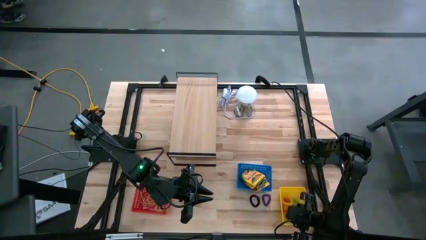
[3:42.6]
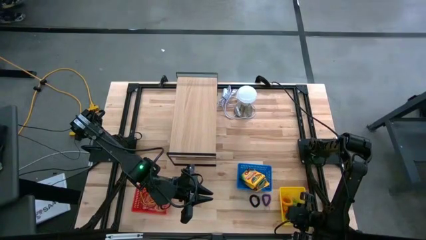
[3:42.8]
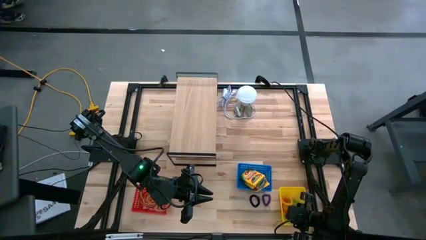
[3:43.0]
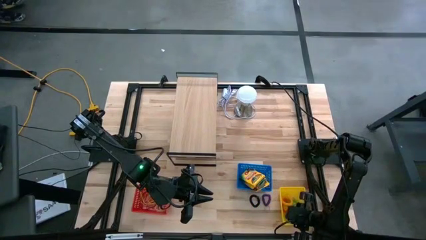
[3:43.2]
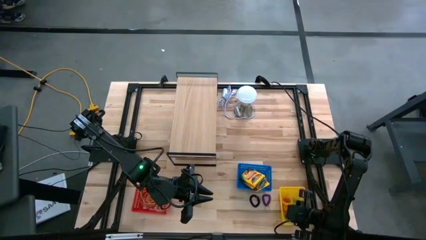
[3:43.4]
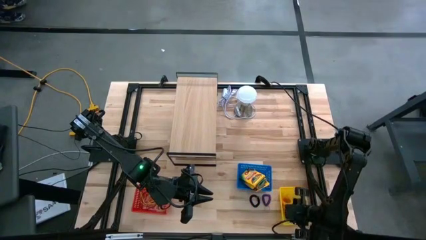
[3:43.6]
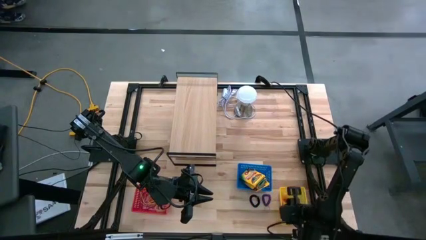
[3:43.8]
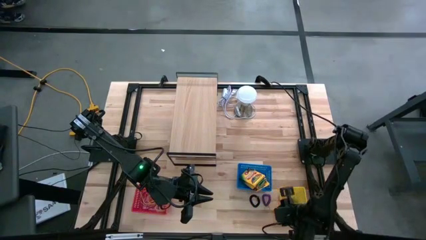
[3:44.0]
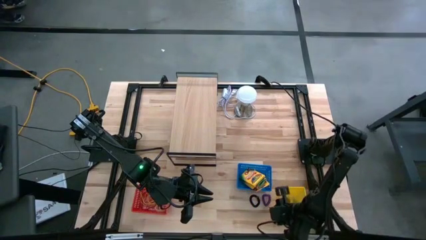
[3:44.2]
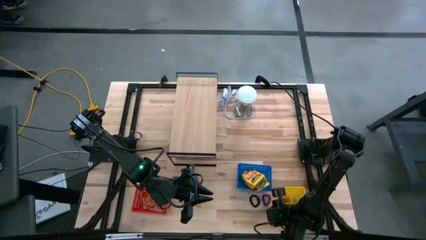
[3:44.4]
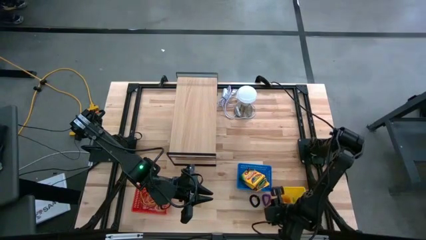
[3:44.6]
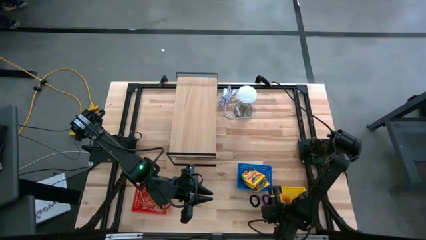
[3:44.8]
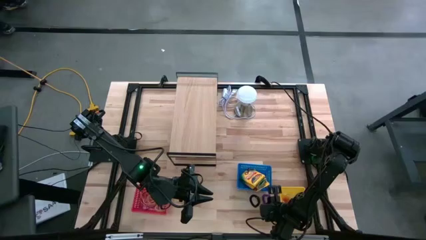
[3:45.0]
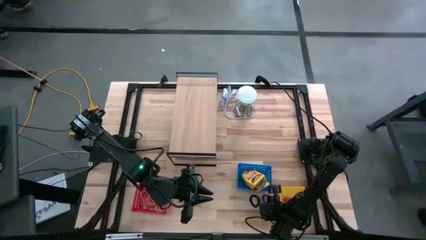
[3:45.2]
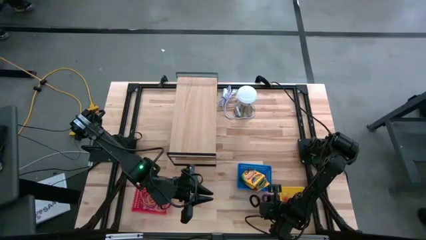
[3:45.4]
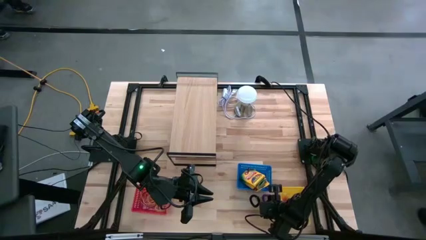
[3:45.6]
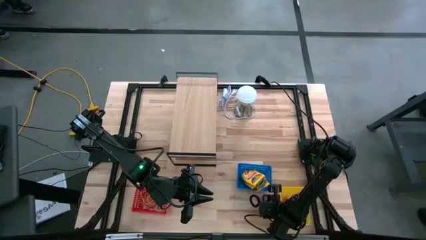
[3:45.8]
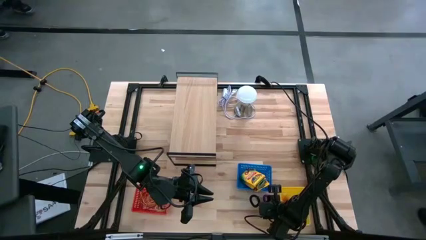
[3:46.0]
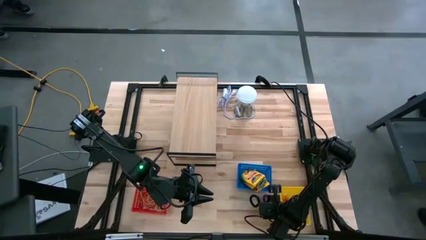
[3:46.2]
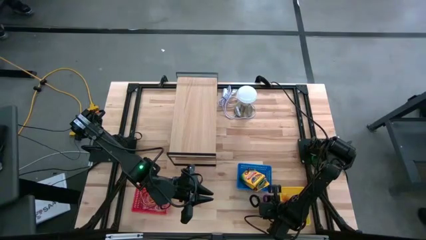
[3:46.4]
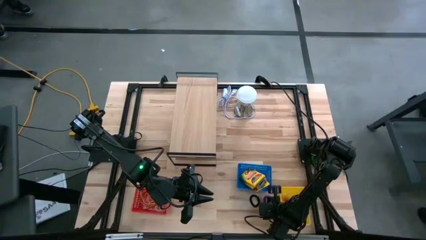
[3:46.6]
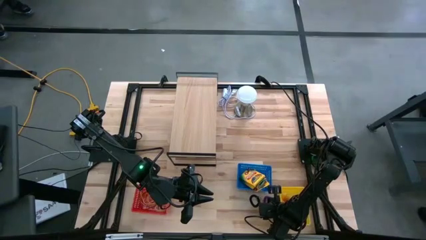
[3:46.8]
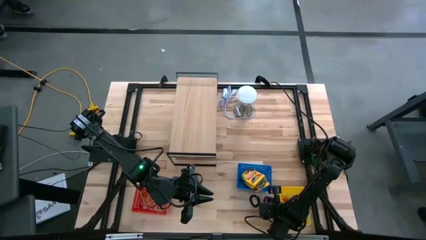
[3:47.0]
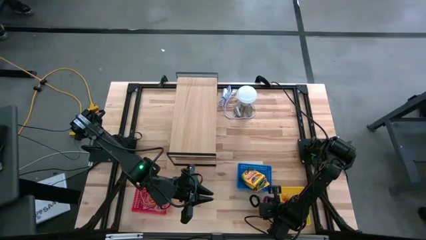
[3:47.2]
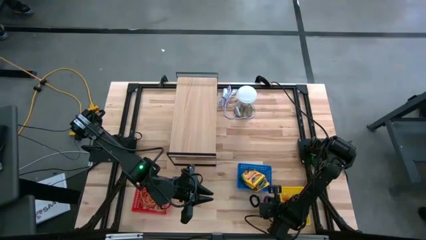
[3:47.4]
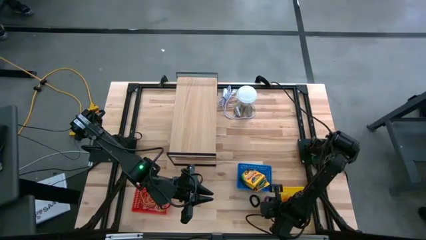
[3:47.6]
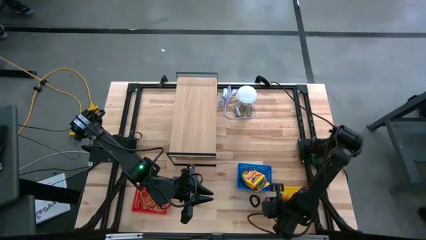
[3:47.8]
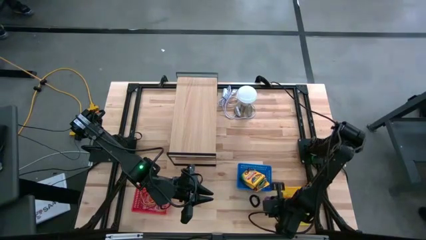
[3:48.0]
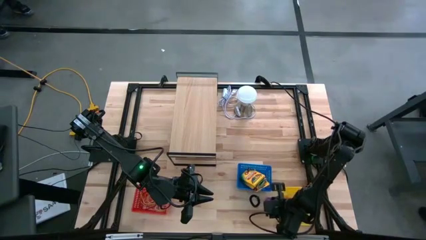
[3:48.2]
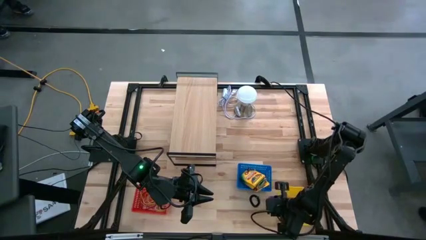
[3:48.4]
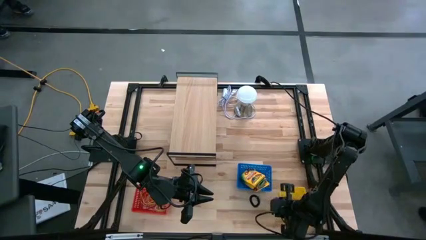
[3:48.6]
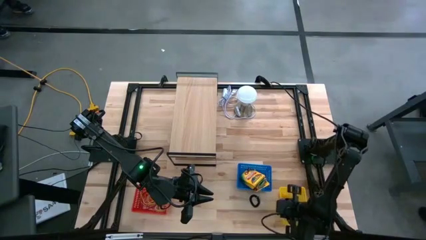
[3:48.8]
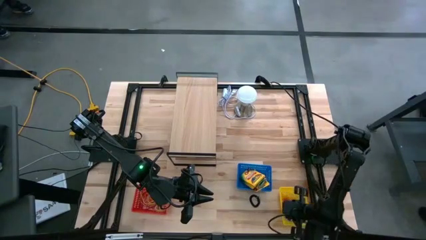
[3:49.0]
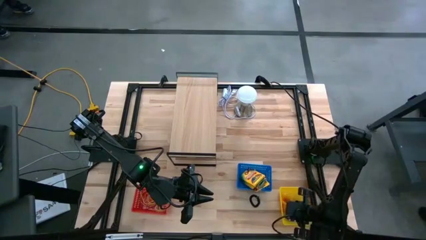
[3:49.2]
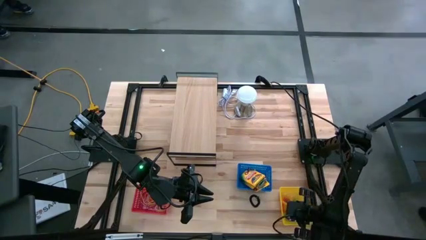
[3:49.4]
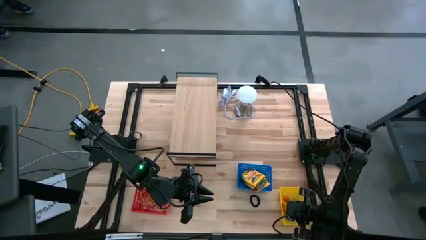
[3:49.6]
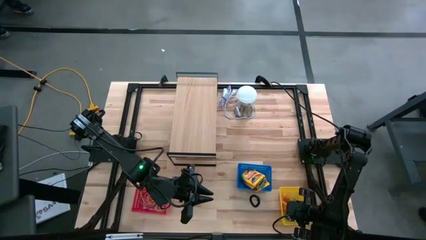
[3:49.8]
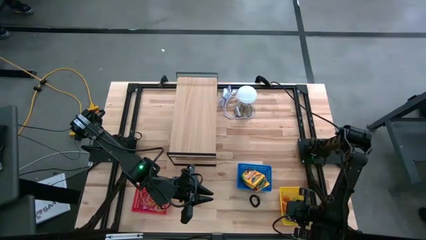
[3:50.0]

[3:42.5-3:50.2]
Task: Pick & Place Office Desk Supplies
Put the purple spiral keychain into the yellow bin

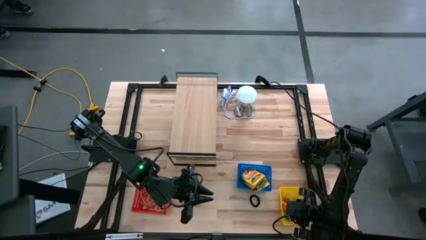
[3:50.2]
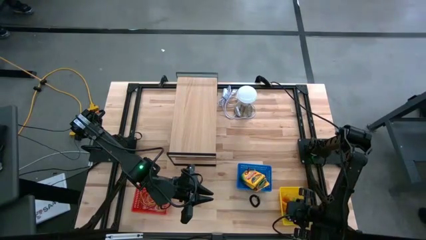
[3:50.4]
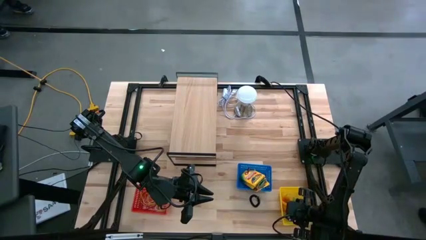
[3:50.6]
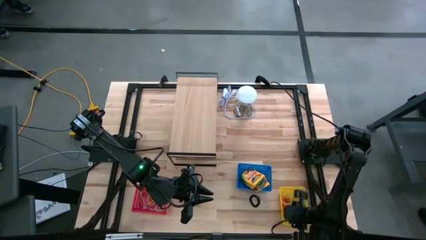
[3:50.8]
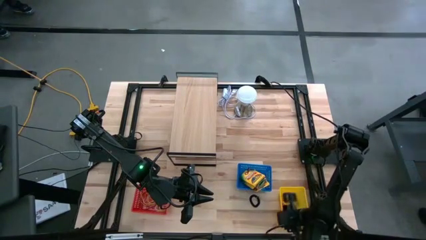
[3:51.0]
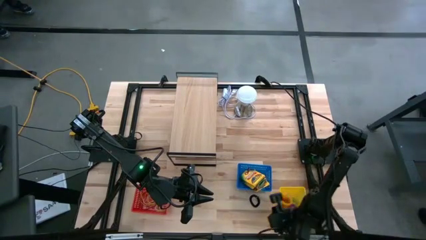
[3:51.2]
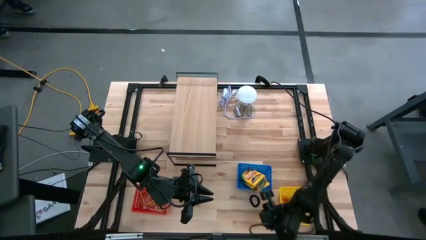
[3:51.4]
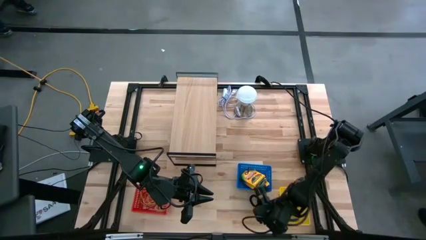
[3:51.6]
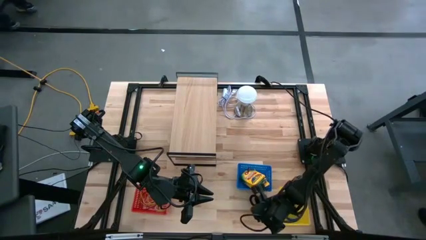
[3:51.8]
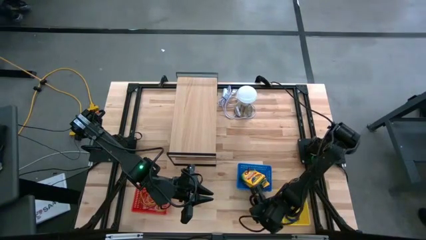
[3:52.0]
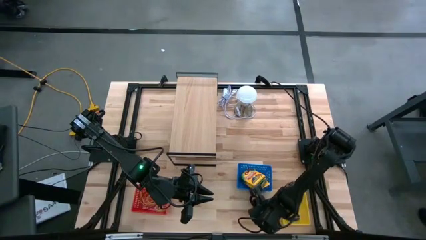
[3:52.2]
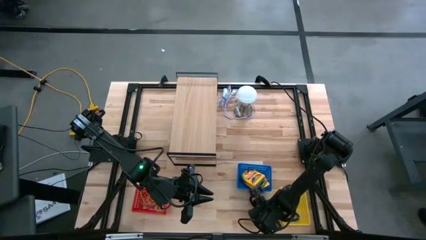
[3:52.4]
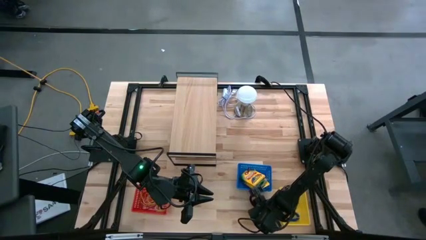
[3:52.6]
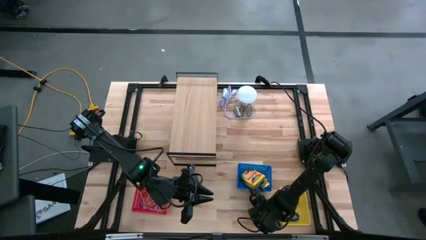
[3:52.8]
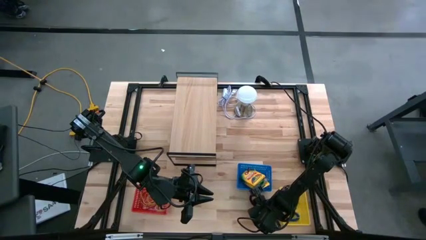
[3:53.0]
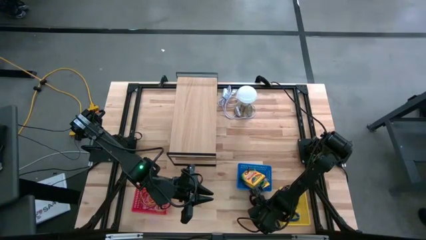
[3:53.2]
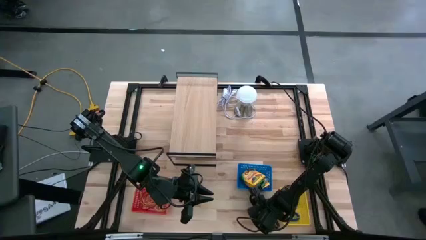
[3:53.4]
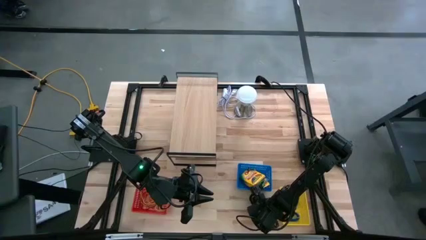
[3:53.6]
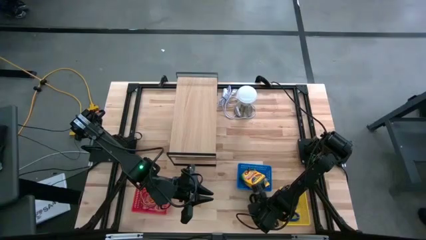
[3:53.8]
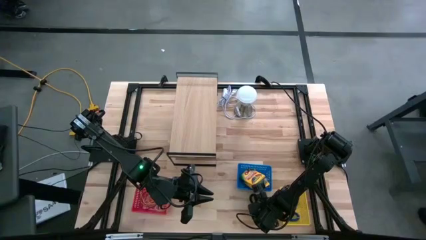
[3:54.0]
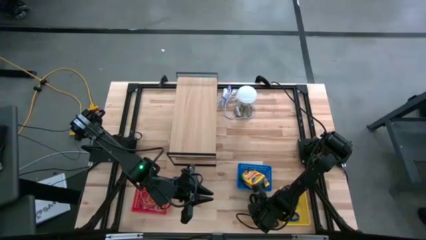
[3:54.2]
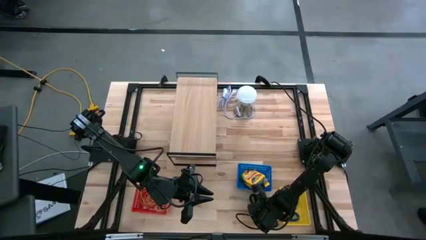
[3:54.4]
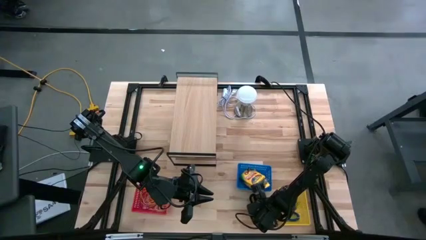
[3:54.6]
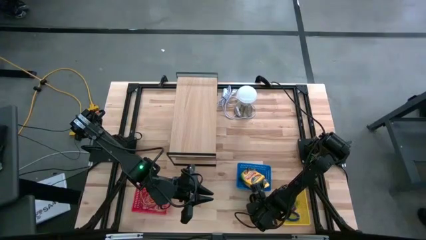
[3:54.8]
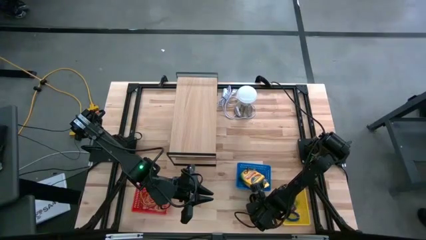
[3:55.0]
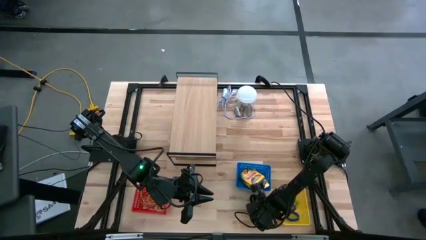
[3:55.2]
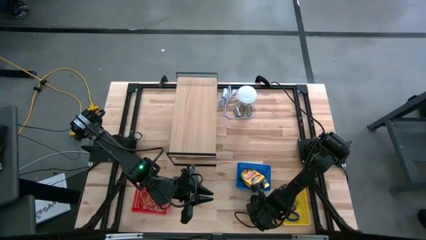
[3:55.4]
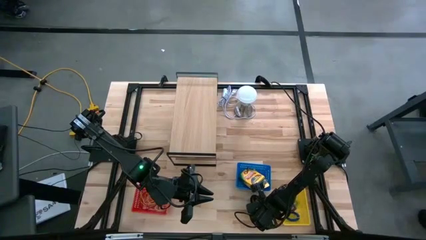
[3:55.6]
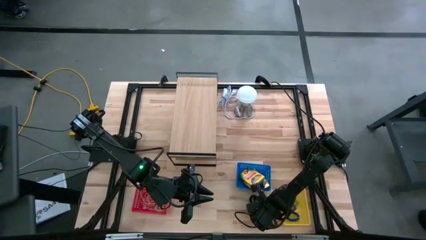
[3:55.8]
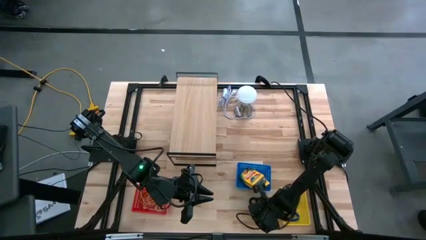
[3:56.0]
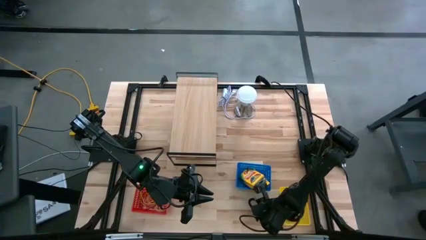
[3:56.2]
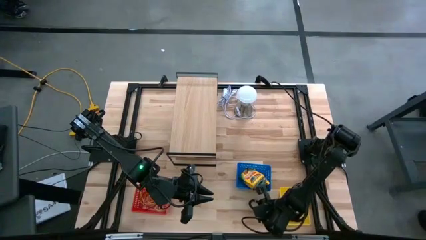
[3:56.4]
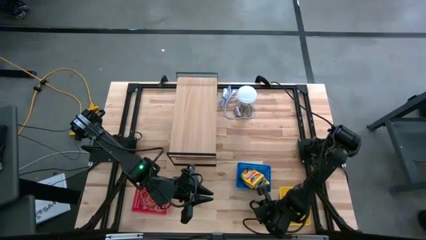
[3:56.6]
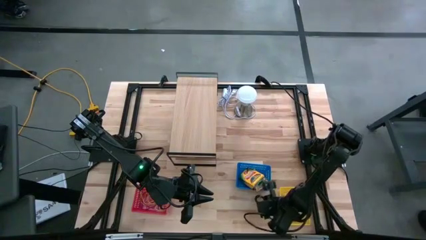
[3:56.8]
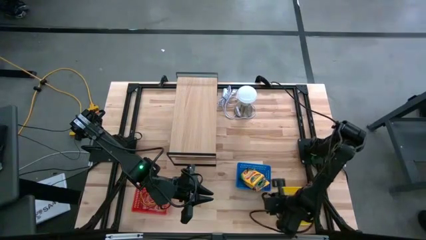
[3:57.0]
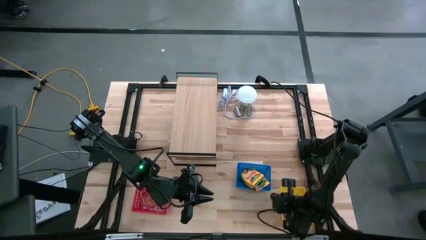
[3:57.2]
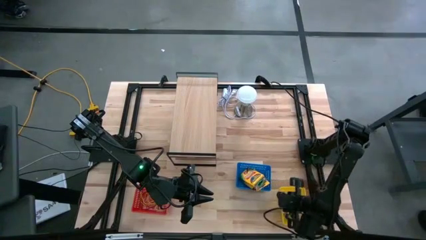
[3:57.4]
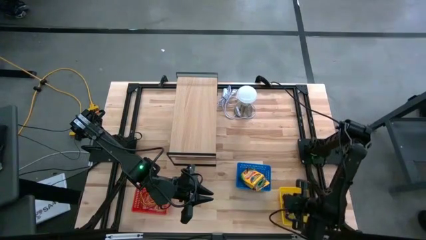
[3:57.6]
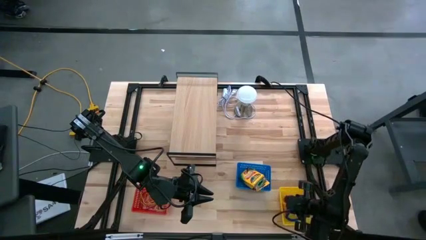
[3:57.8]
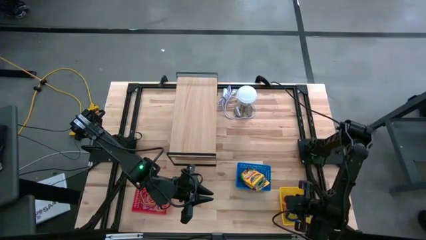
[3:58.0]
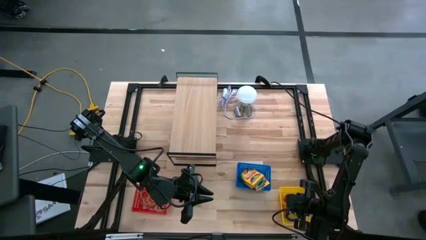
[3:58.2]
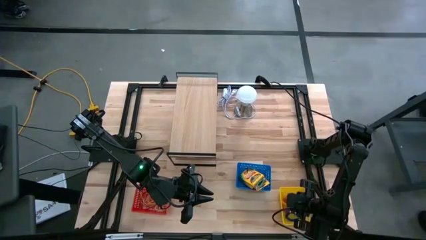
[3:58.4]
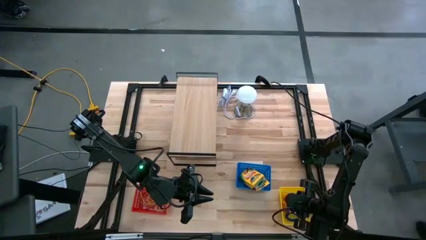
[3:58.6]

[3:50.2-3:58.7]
Put the black spiral keychain into the yellow bin

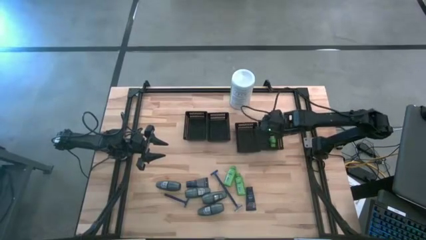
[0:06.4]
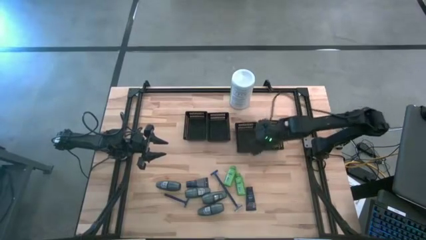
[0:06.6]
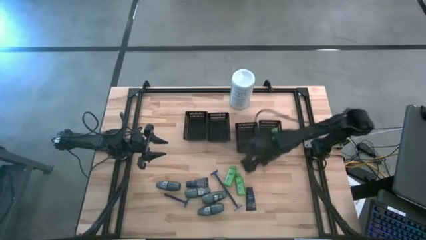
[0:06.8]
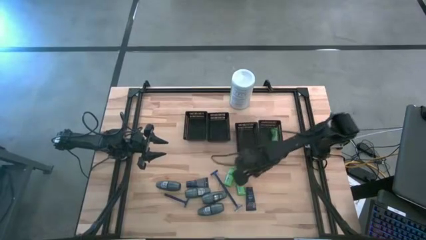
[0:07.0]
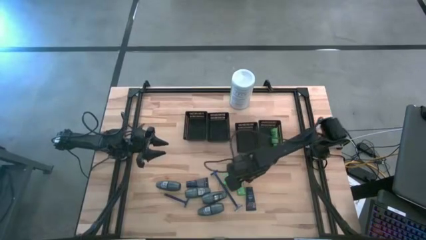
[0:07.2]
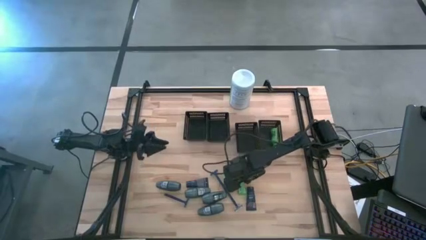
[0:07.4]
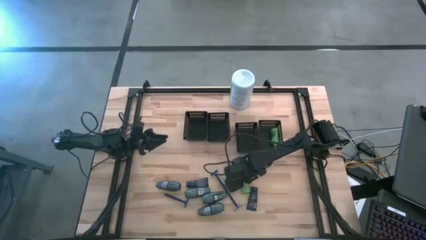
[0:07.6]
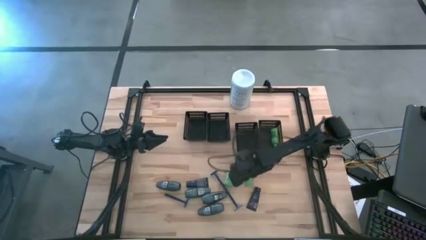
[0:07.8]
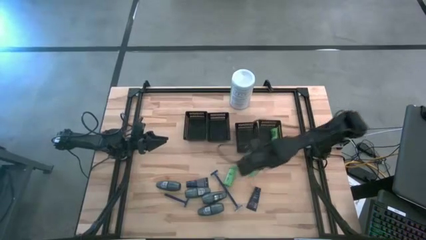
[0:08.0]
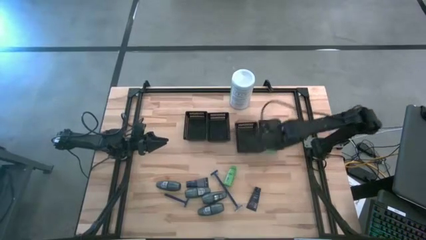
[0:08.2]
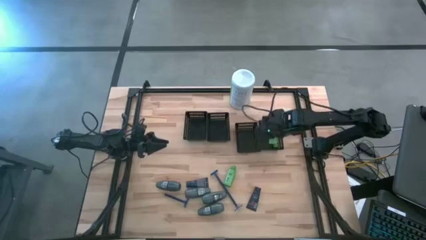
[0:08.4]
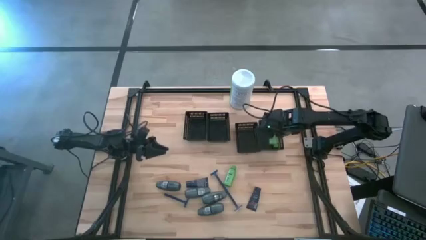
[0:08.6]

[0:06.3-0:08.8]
Task: Pick & Place Travel size toiletries
Put the green shampoo into the right black bin
